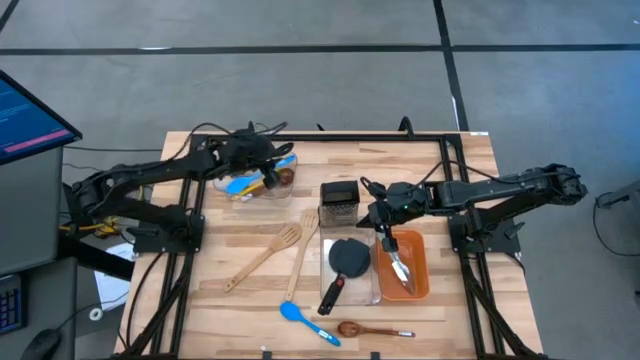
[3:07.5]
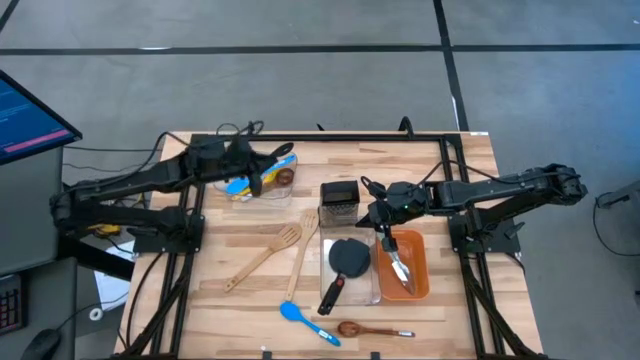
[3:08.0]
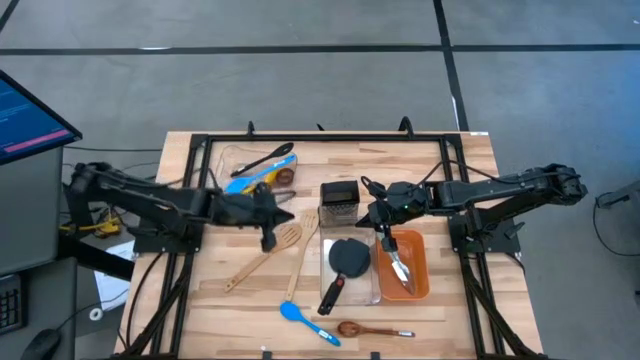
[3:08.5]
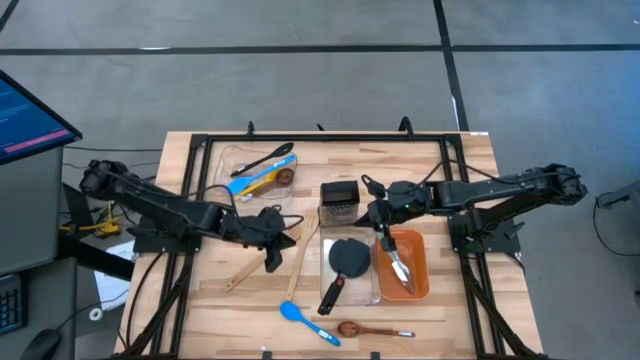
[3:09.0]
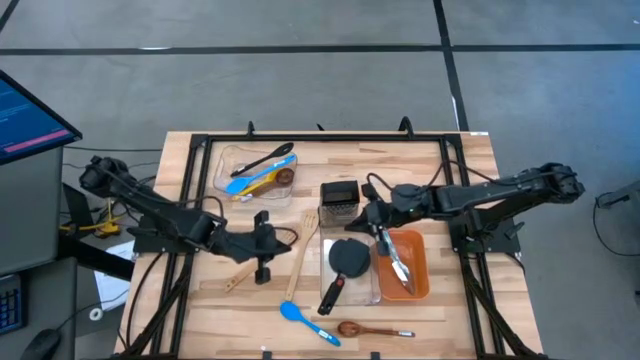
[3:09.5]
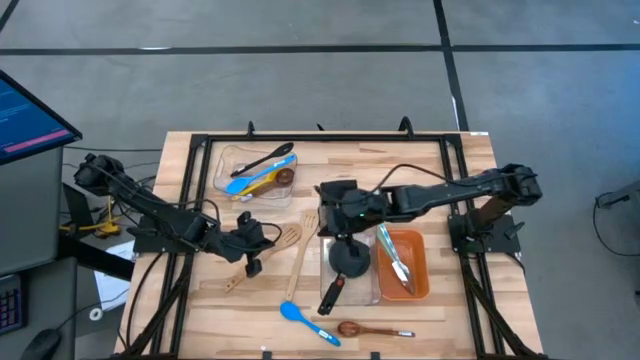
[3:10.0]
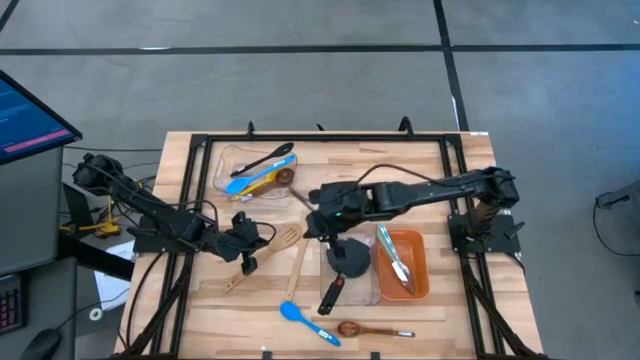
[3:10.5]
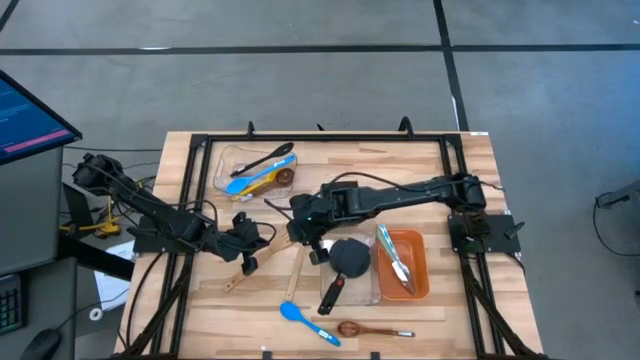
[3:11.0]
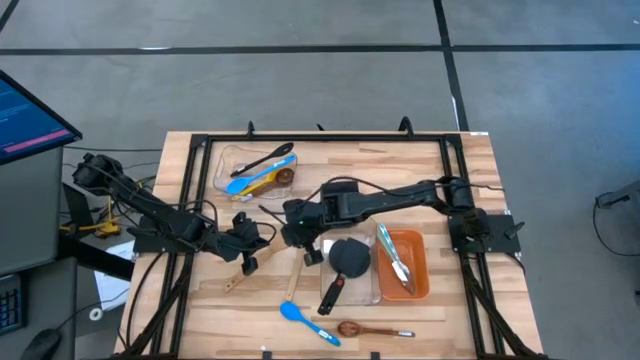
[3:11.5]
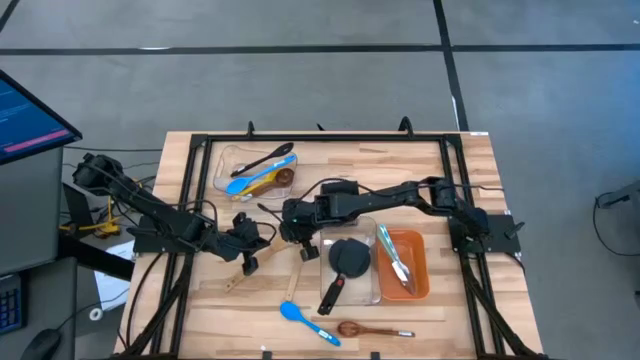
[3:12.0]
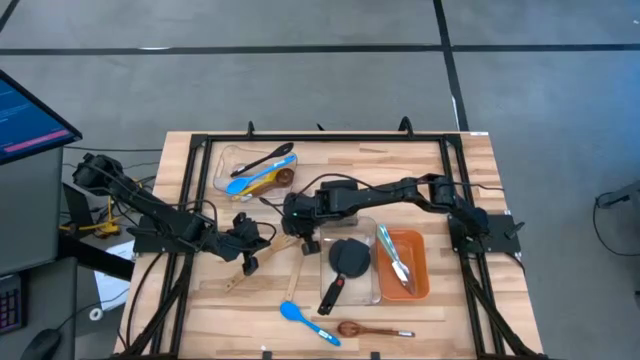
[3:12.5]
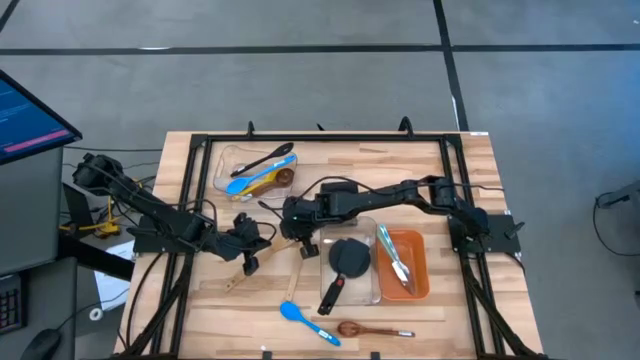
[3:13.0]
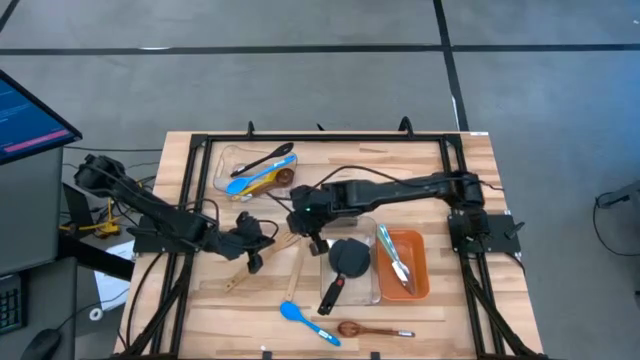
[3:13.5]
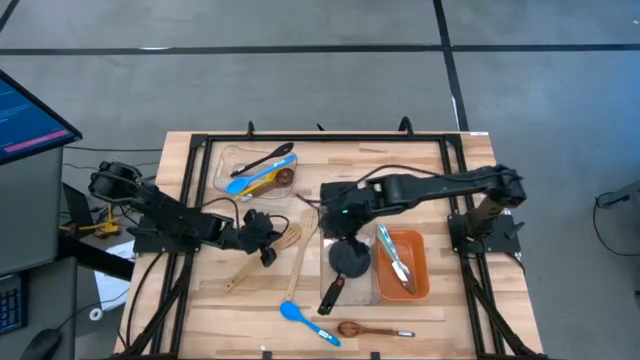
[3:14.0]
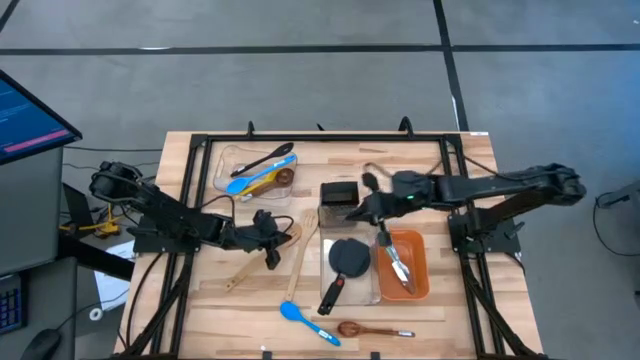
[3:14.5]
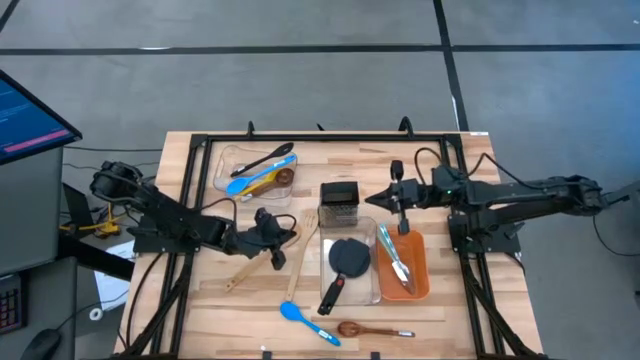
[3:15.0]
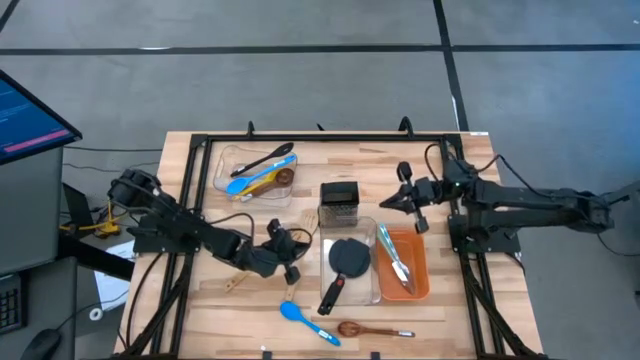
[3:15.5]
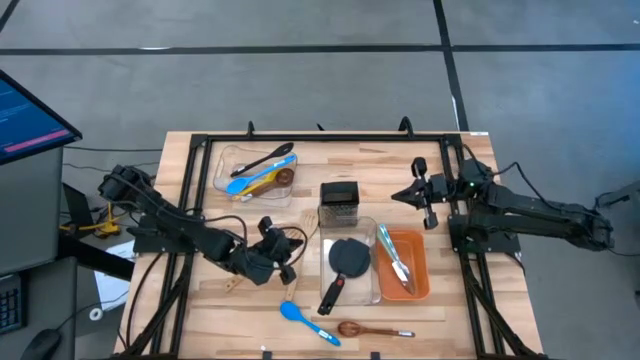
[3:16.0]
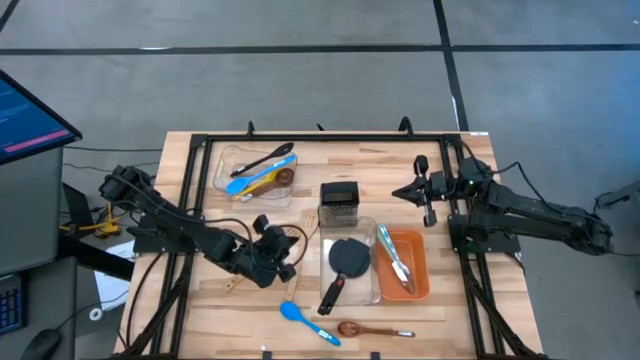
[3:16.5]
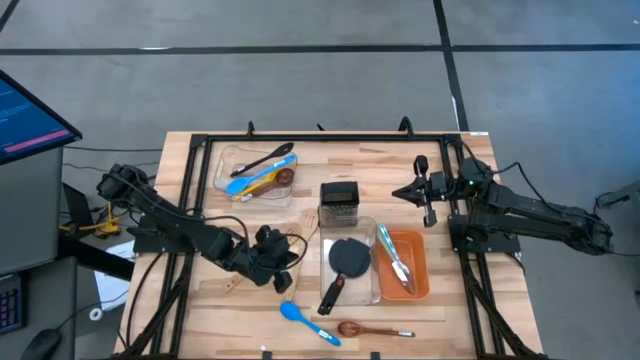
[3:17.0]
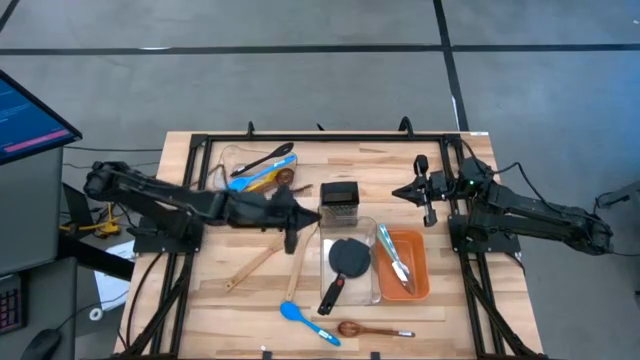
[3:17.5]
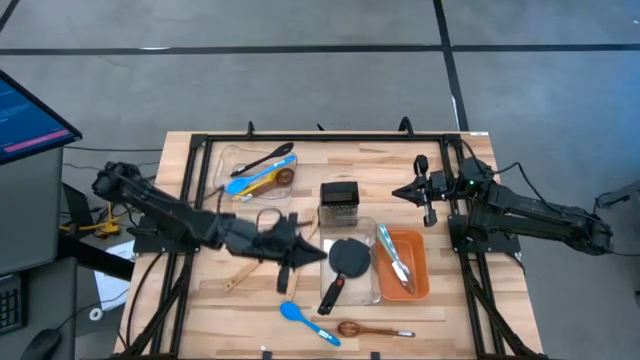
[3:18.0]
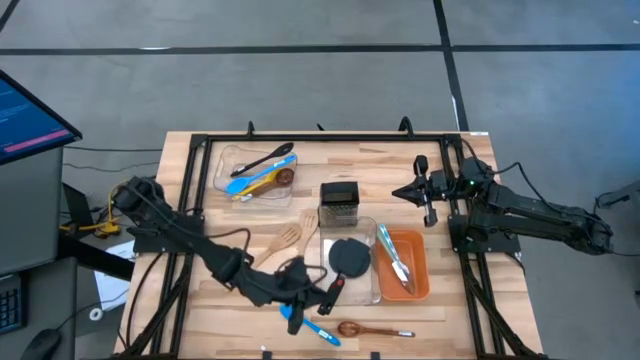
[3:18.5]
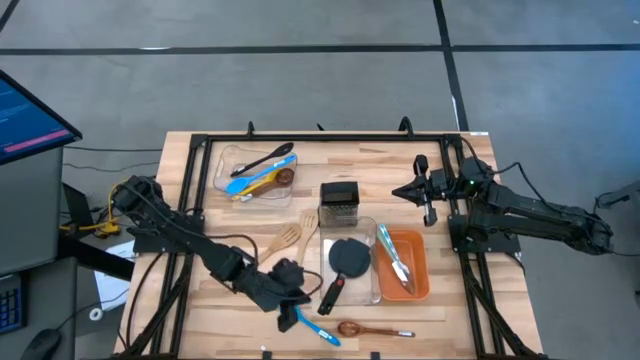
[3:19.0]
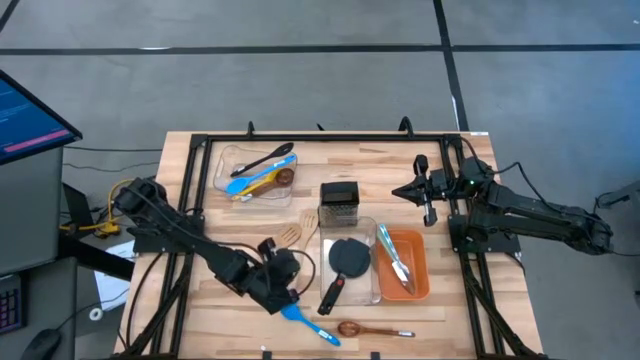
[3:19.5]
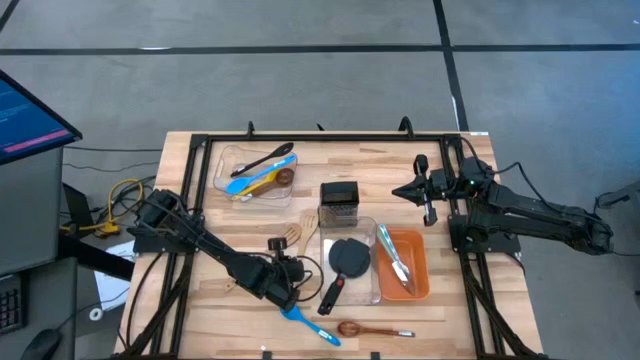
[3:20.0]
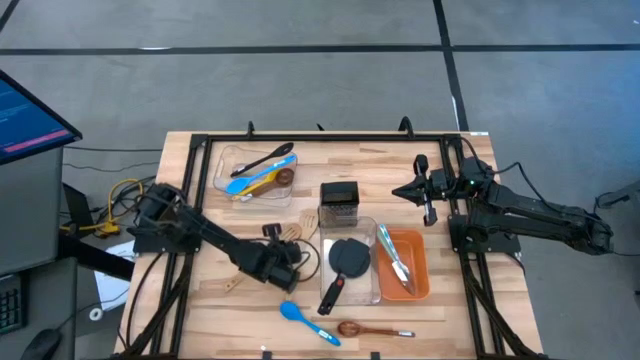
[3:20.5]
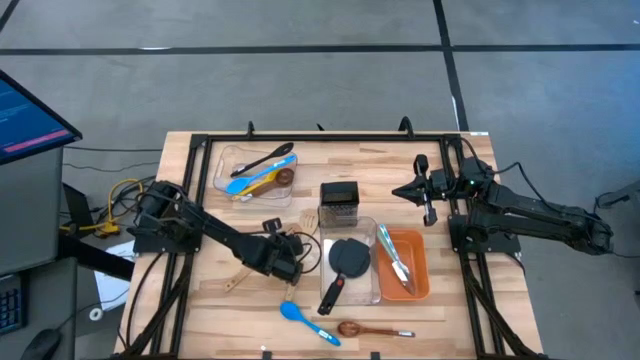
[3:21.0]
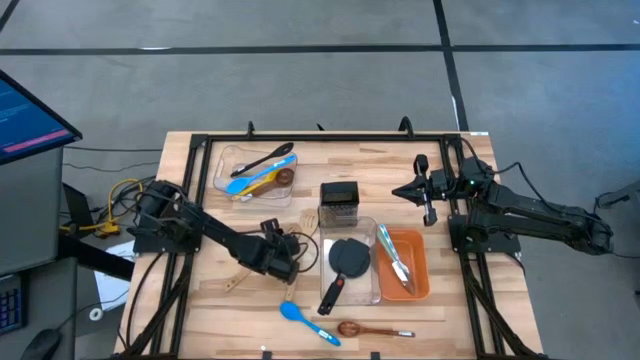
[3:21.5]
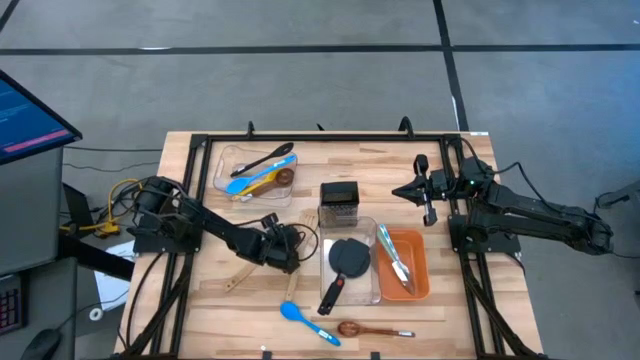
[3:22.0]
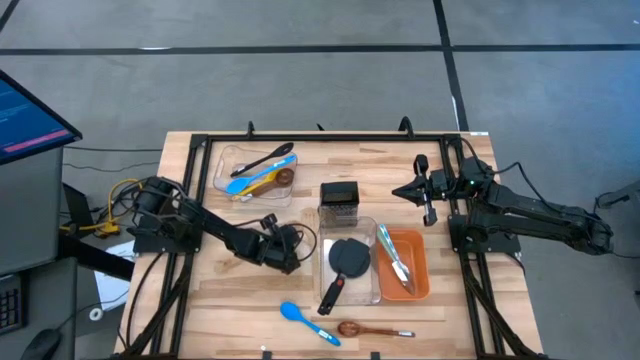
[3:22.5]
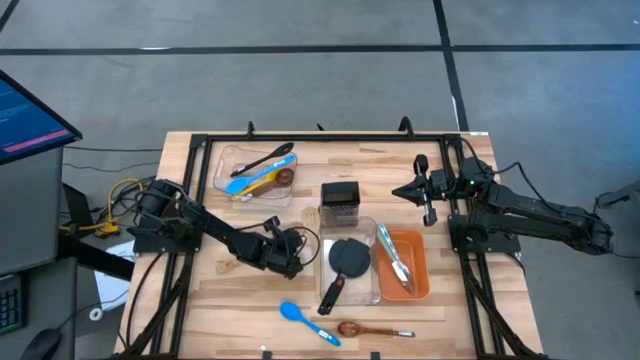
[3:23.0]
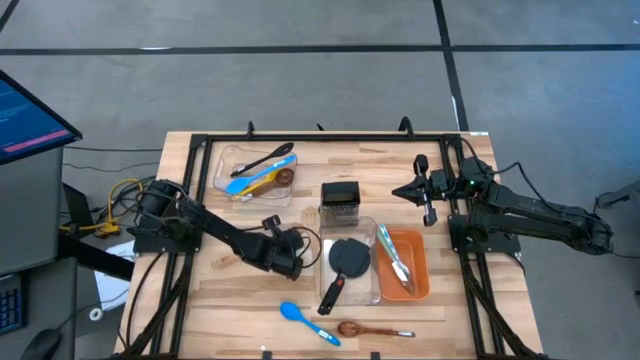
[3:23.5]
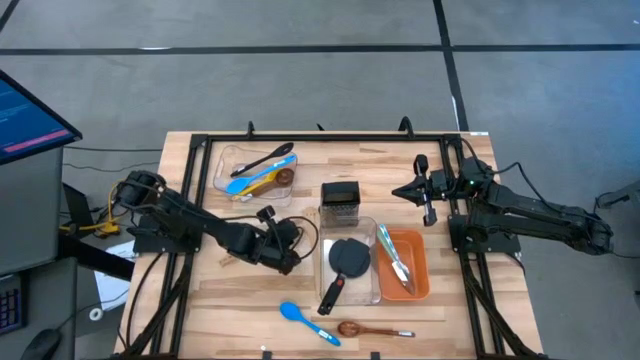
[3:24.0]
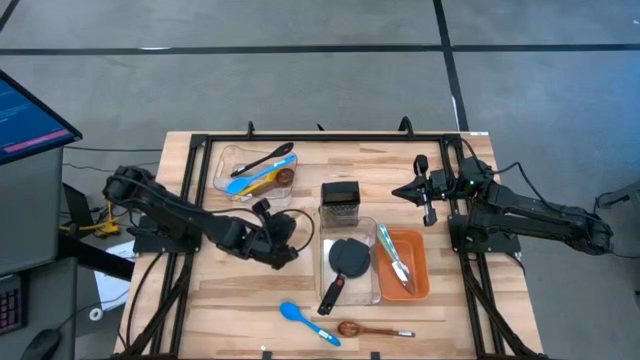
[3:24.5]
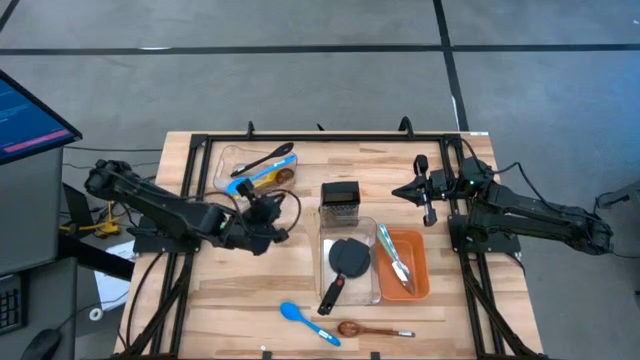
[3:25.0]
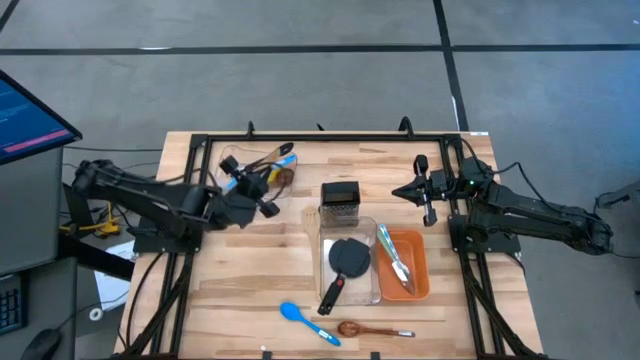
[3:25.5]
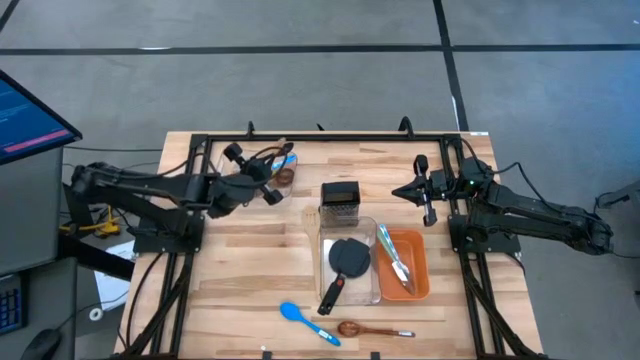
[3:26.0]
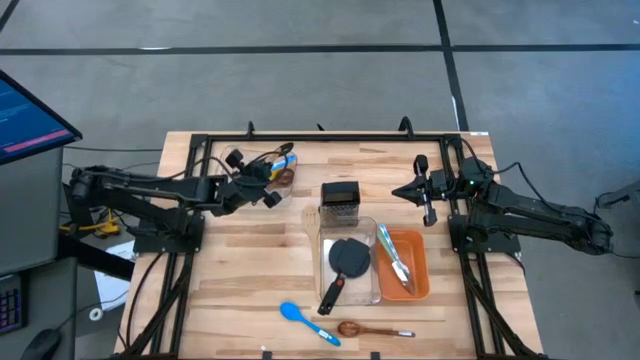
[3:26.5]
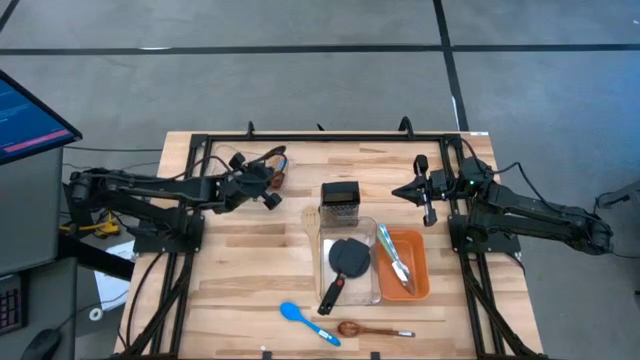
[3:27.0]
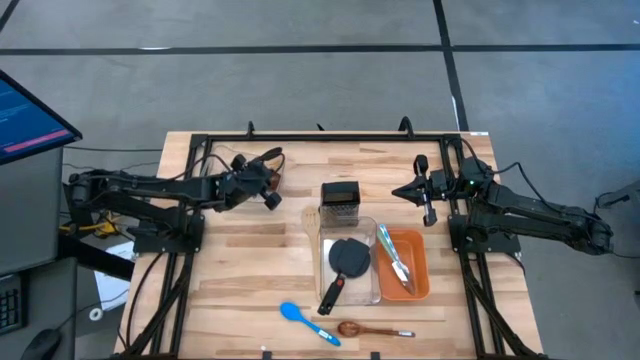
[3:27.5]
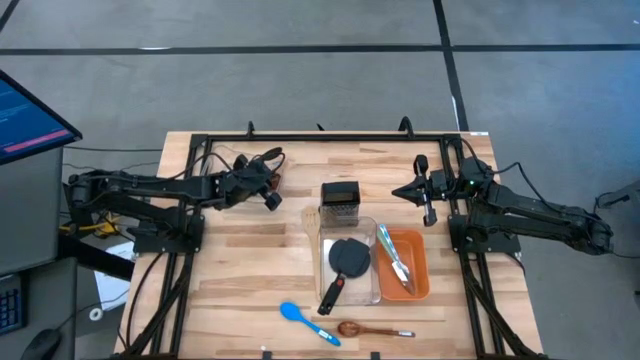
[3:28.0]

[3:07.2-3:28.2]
Task: Pick & Place Kitchen Items
Put the brown ladle into the top transparent bin

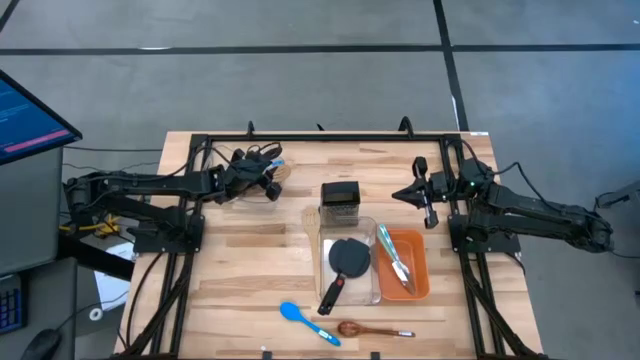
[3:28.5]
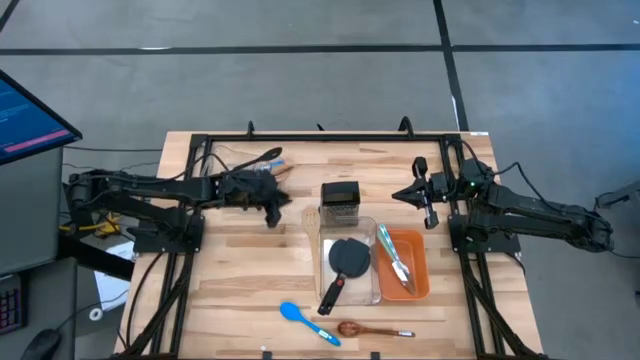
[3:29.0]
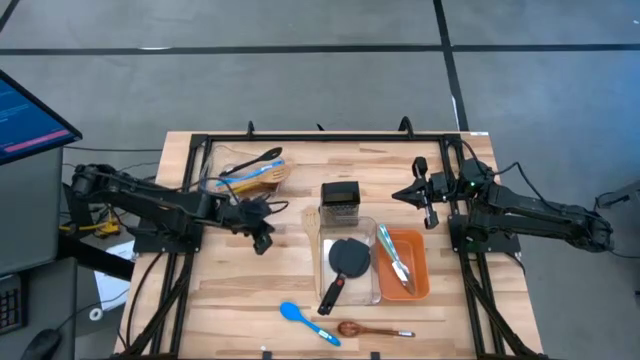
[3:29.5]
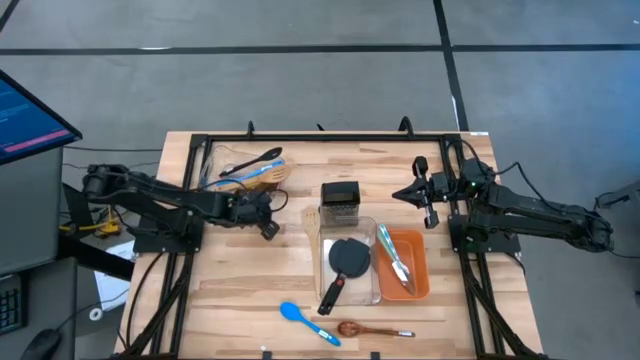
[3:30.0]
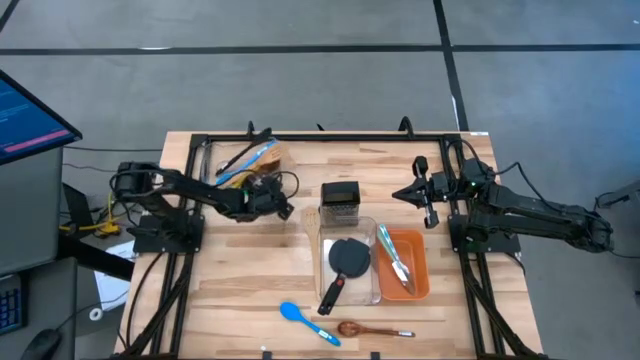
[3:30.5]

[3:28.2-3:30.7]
Adjust the top transparent bin on the table
